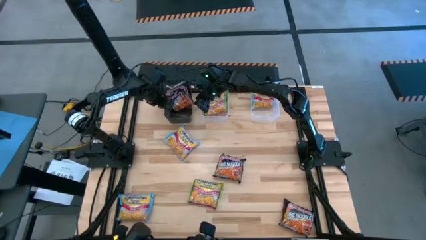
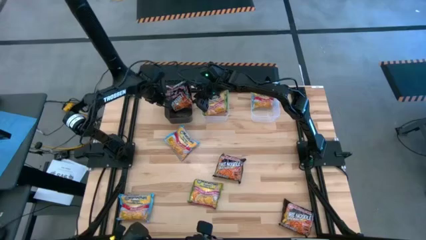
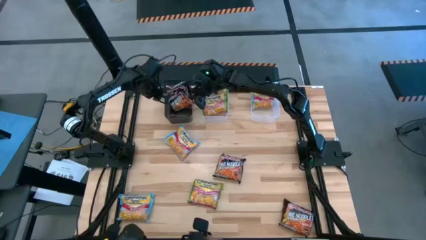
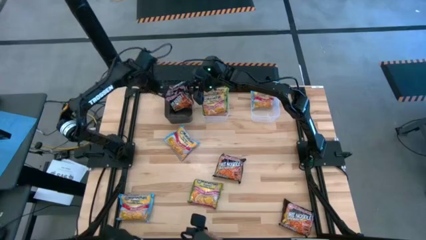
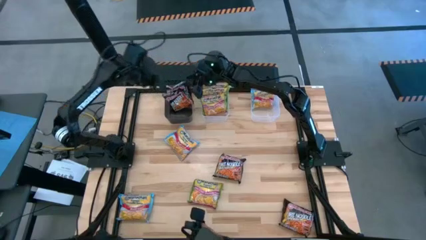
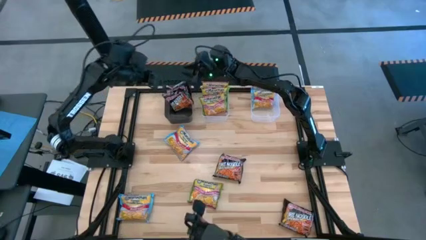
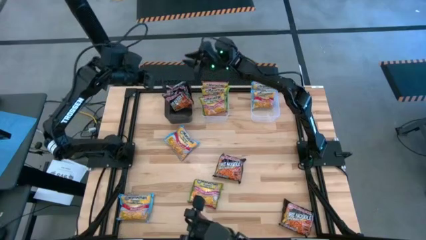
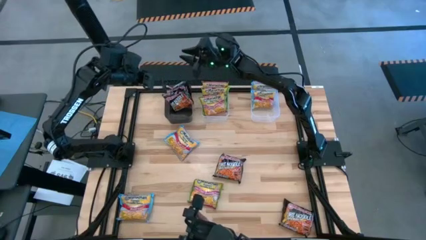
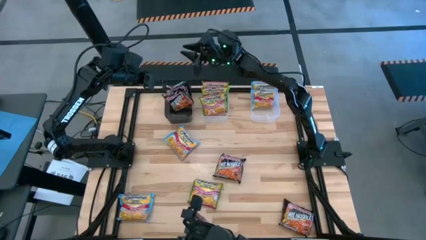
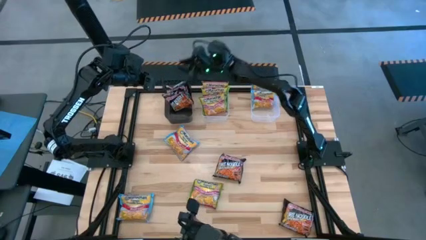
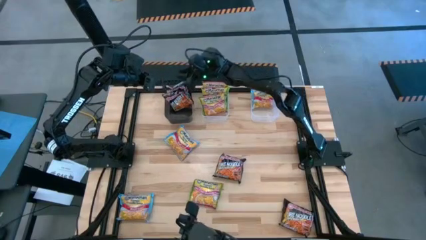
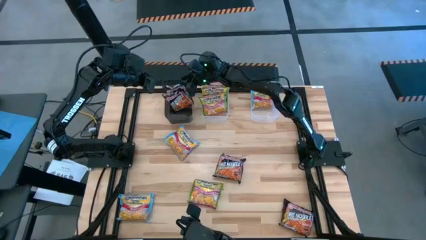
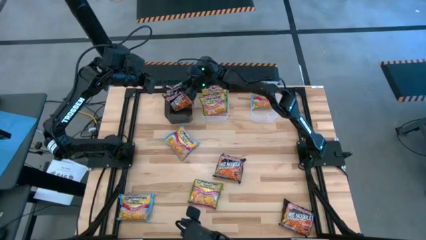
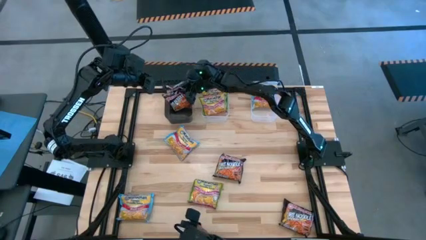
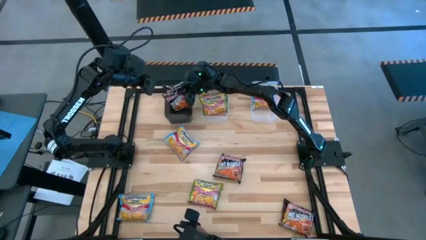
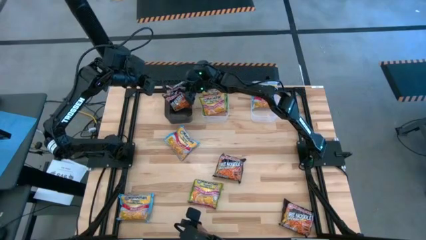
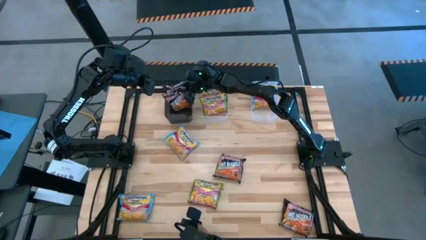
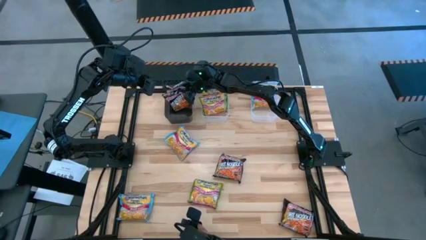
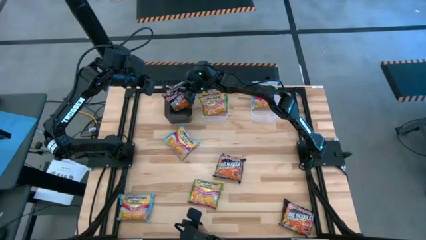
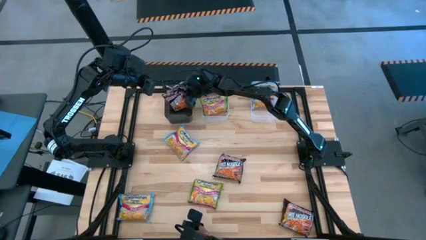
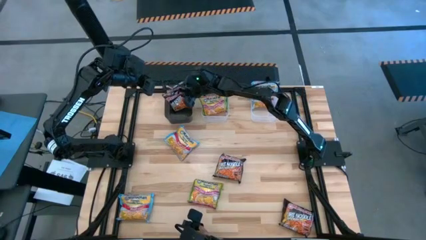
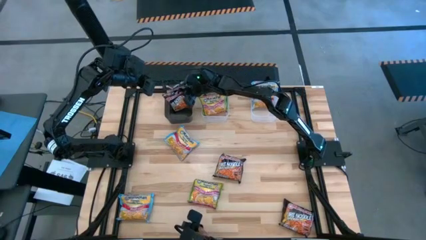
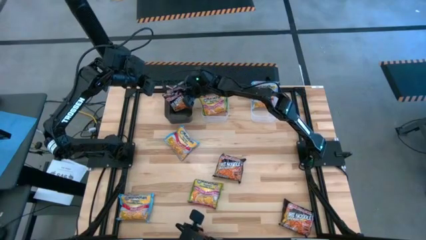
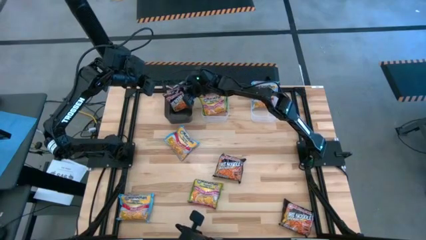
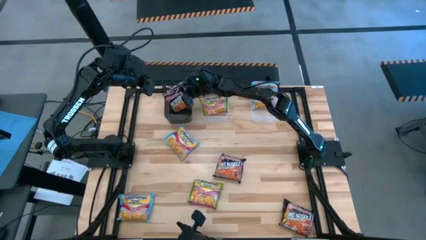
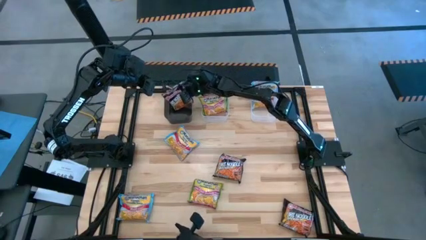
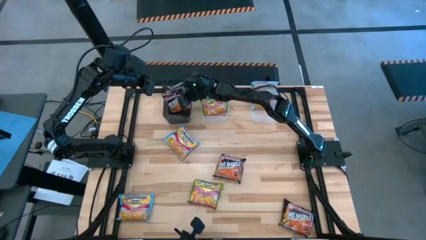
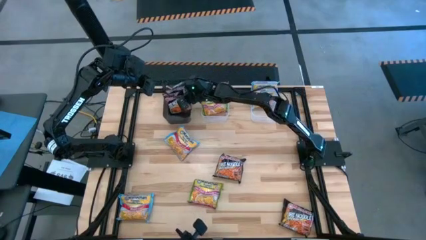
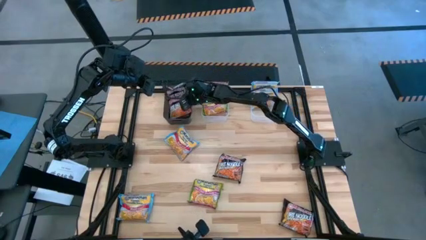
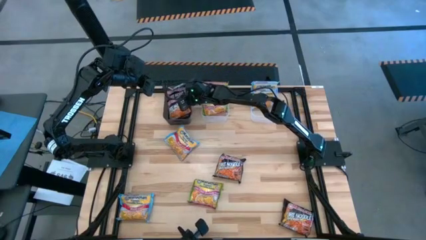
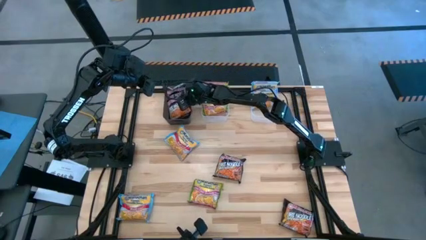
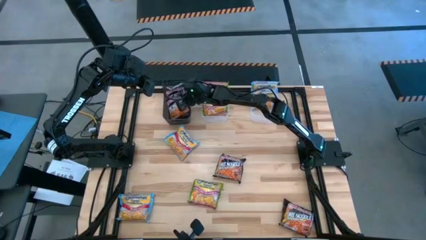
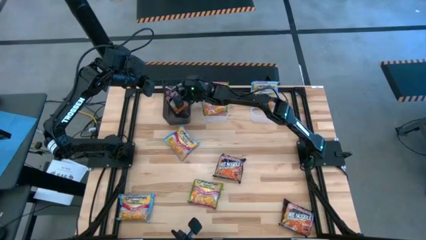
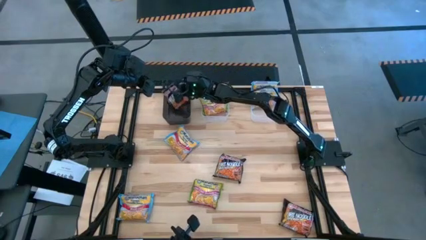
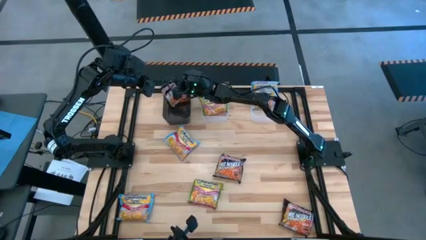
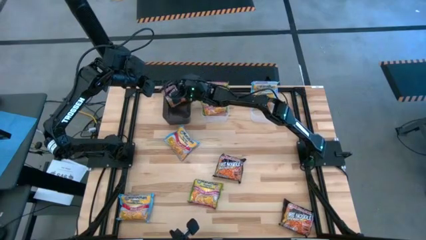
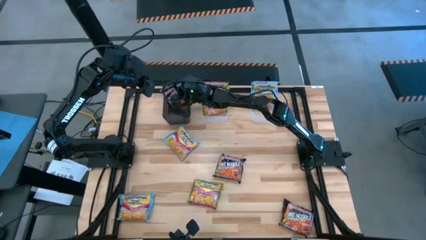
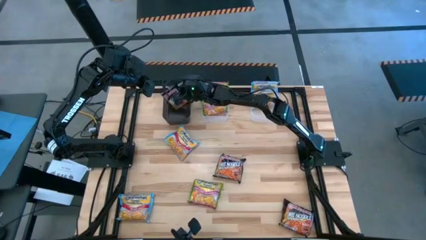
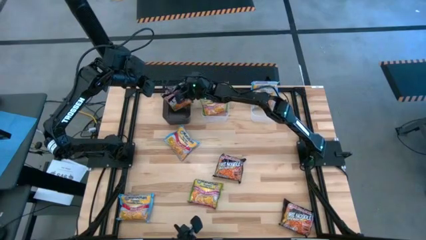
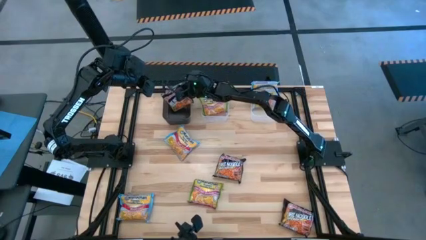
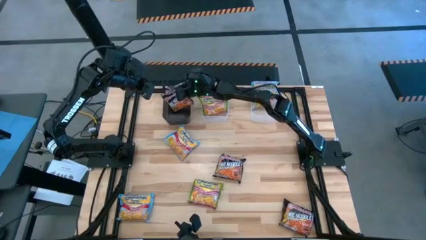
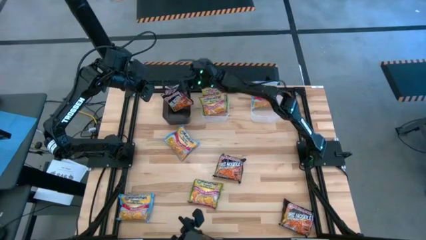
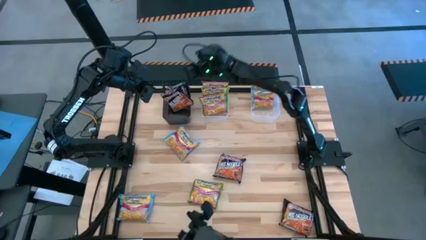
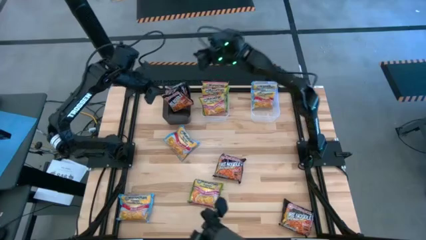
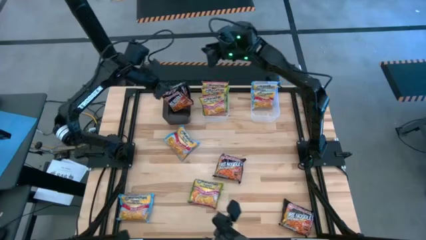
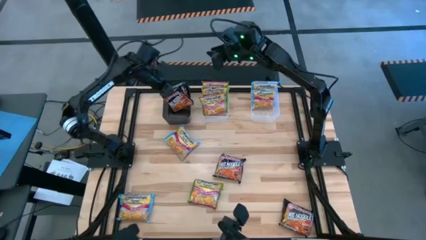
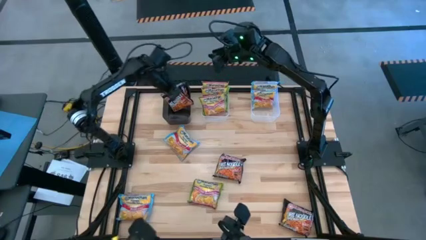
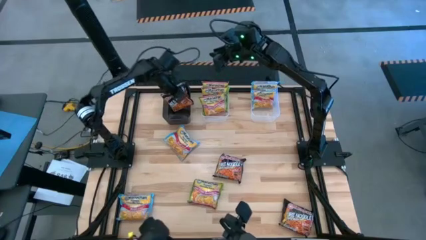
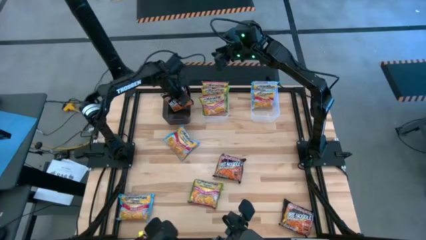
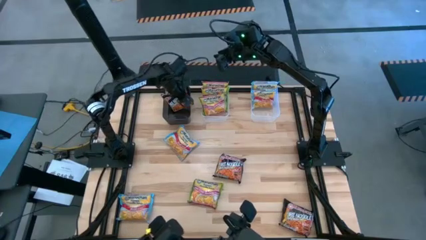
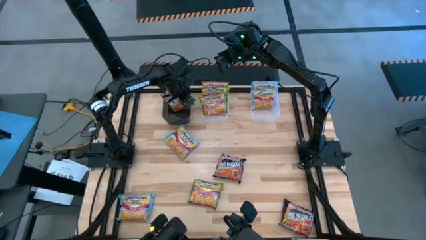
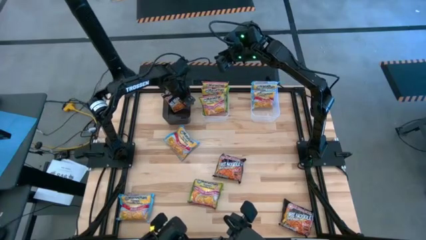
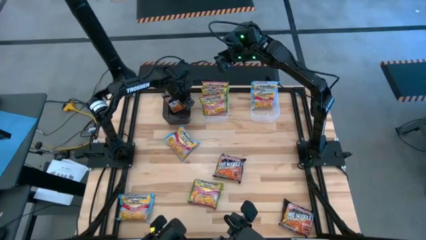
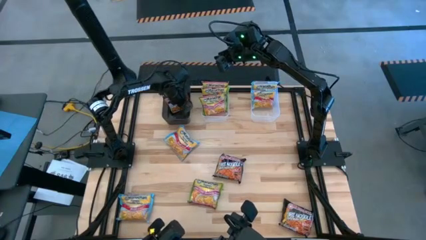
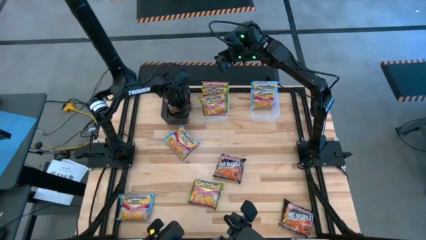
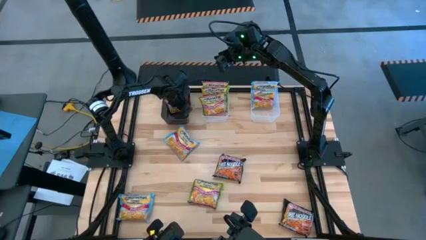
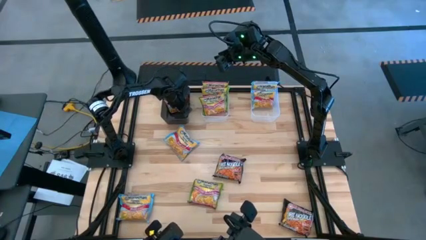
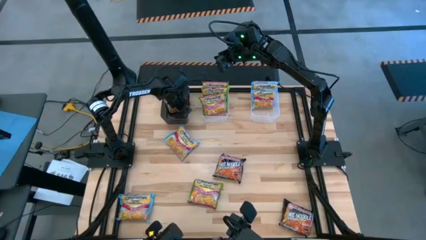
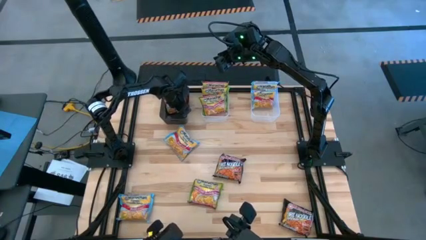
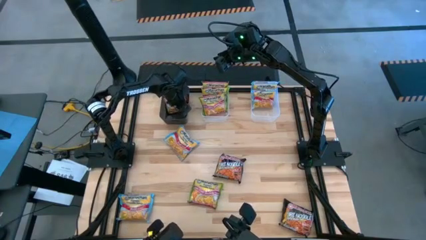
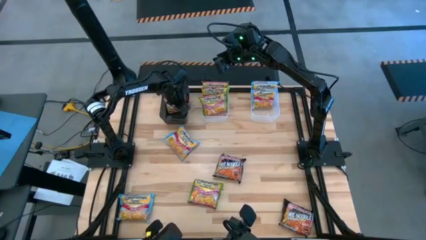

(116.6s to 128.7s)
Task: Sort Maruchan noodles
Adjust the black noodle pack in the black bin

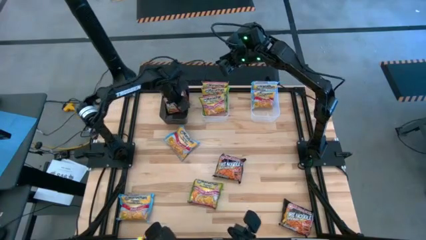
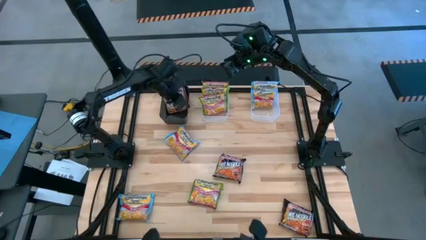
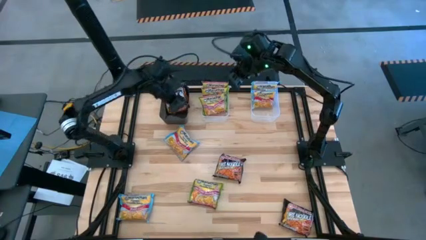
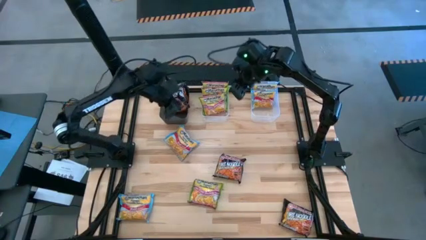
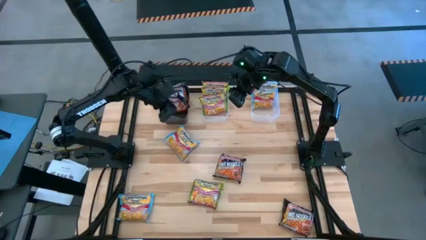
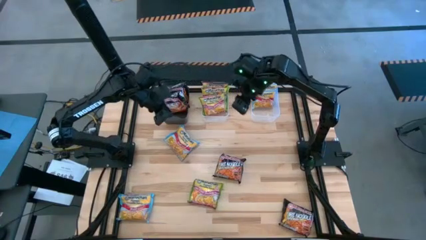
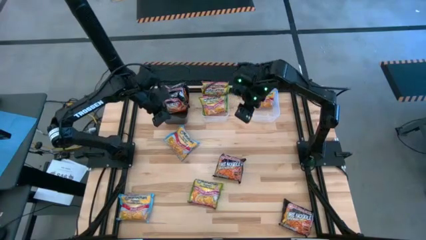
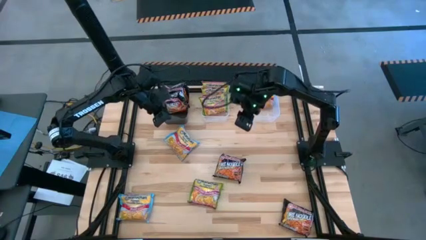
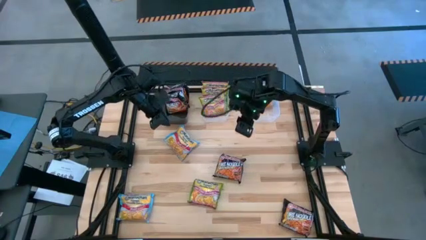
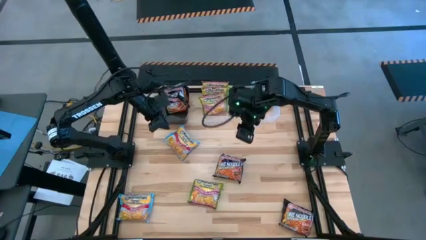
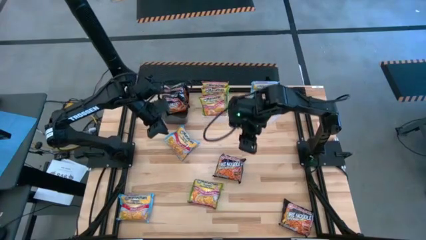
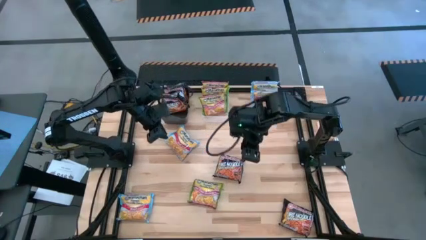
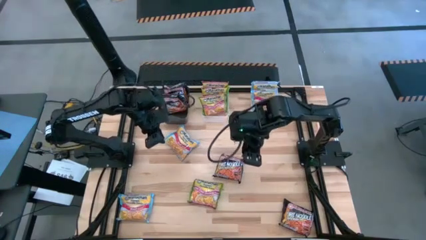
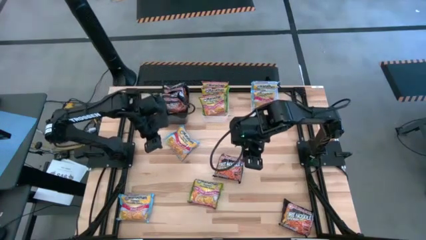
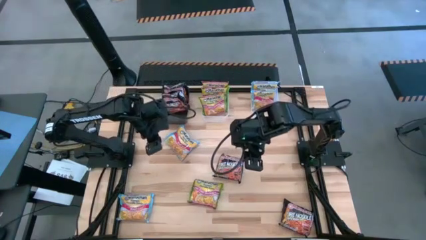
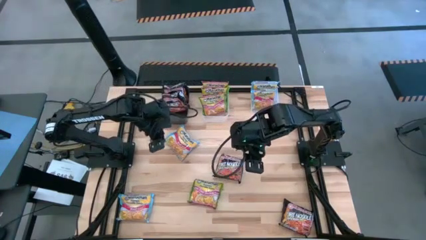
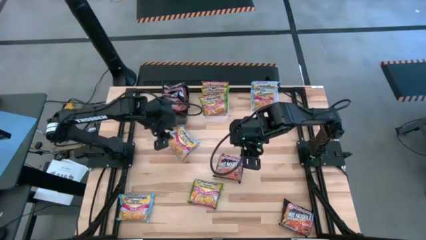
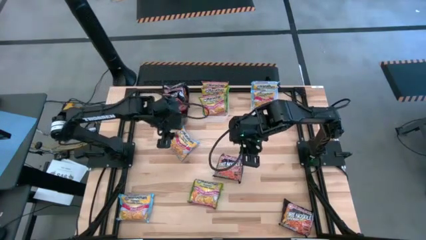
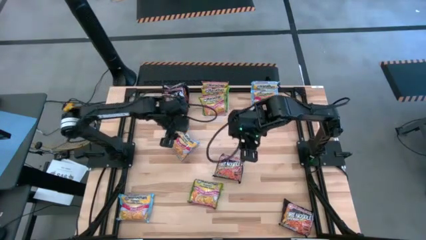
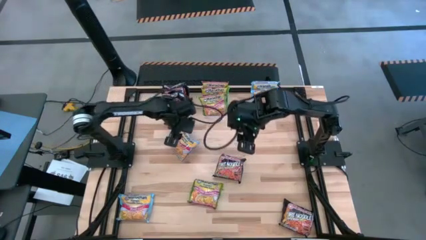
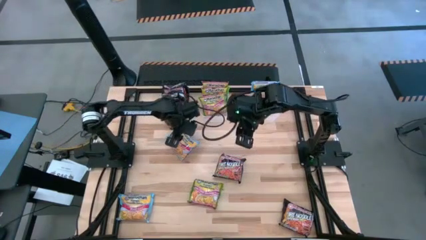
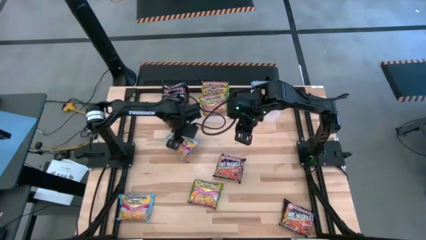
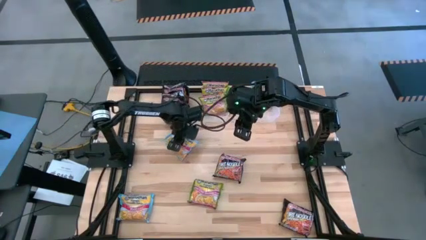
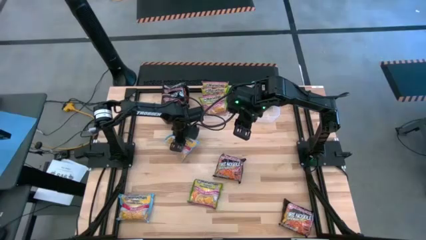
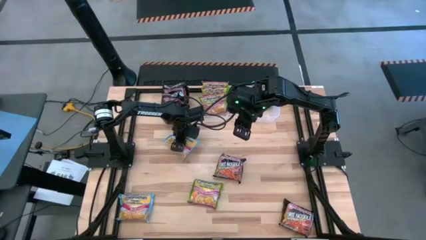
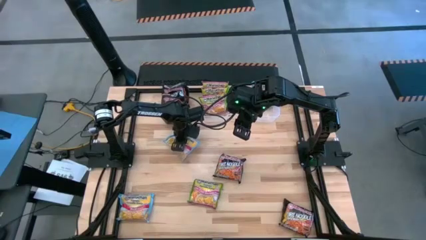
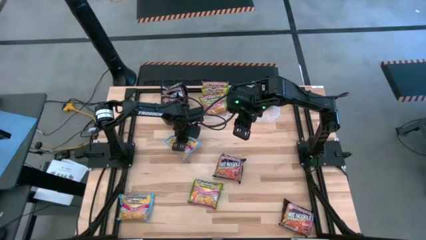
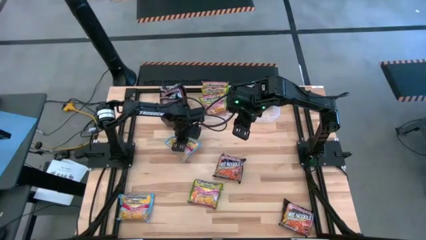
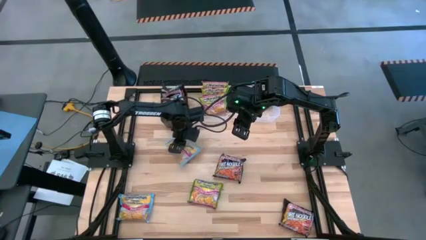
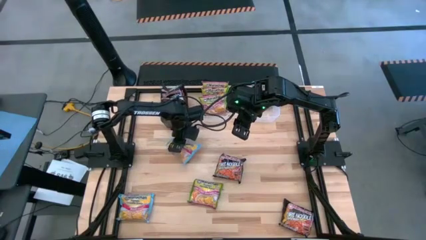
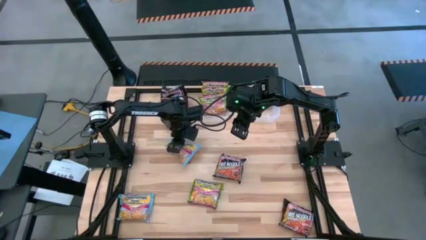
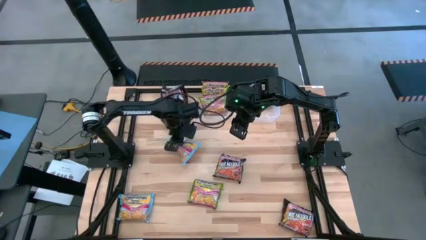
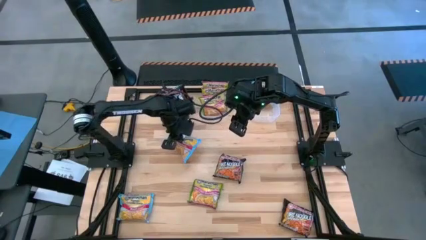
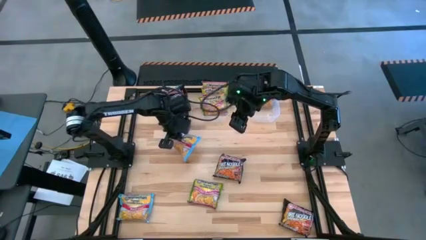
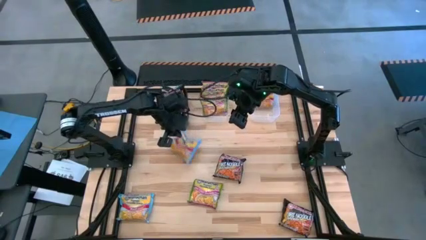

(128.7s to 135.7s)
Put the blue noodle pack into the right transparent bin
